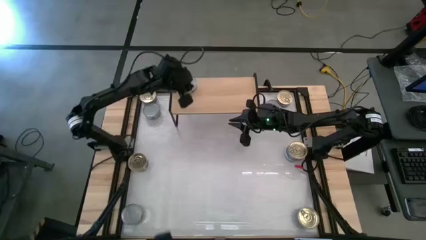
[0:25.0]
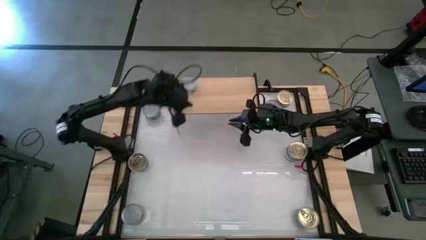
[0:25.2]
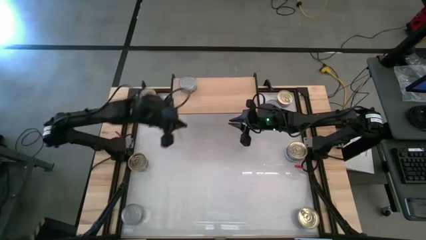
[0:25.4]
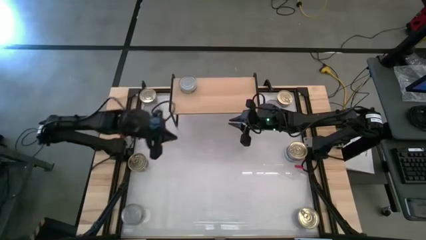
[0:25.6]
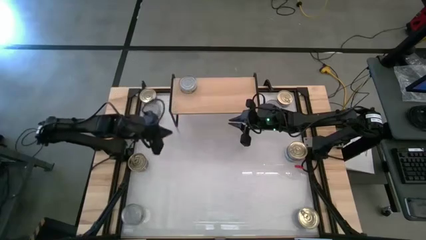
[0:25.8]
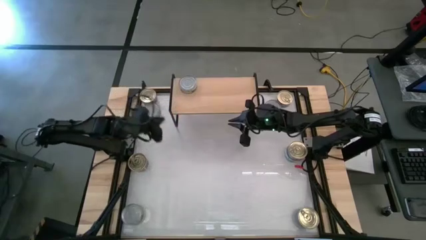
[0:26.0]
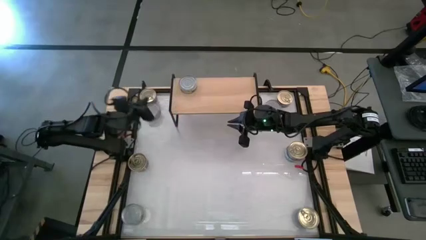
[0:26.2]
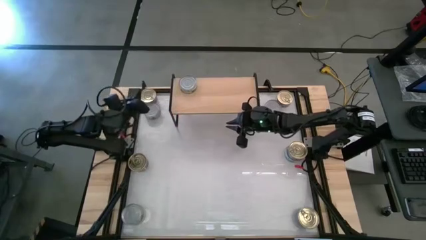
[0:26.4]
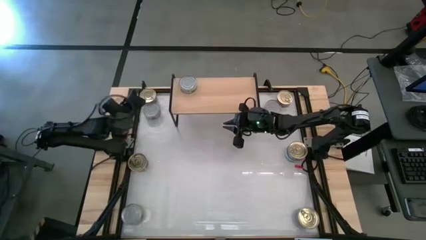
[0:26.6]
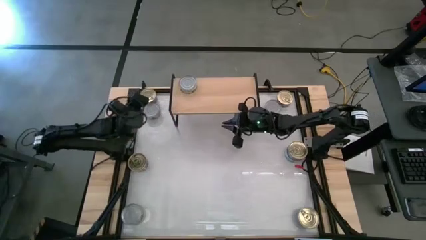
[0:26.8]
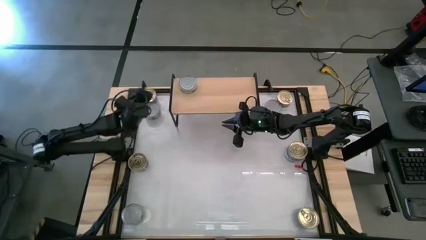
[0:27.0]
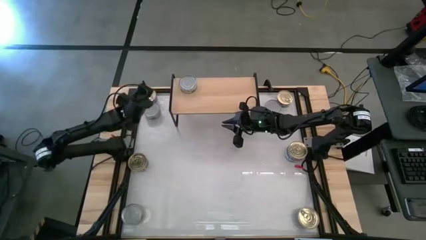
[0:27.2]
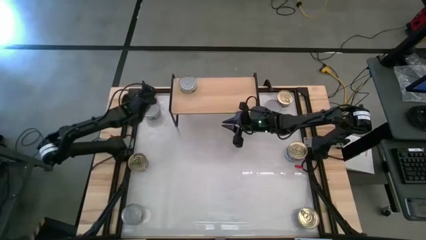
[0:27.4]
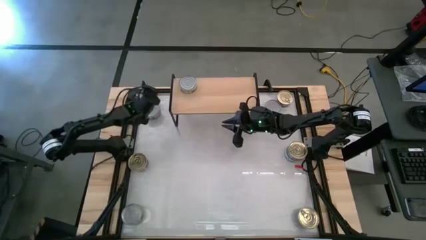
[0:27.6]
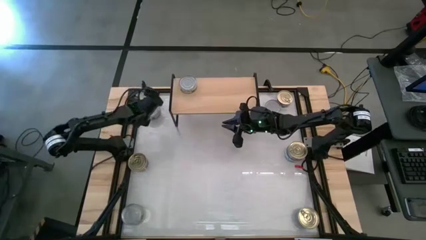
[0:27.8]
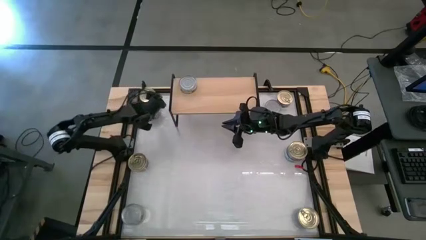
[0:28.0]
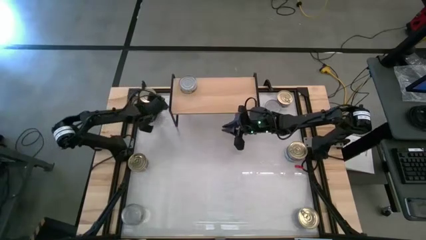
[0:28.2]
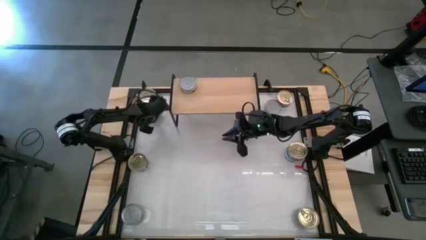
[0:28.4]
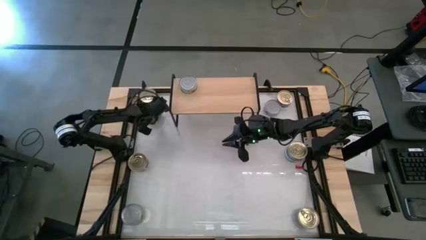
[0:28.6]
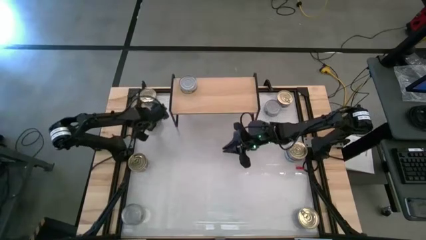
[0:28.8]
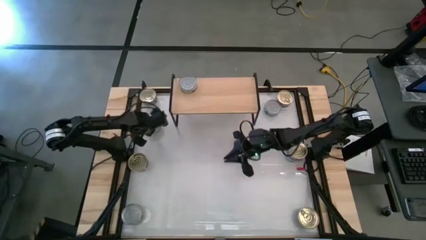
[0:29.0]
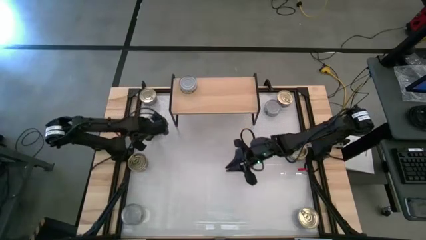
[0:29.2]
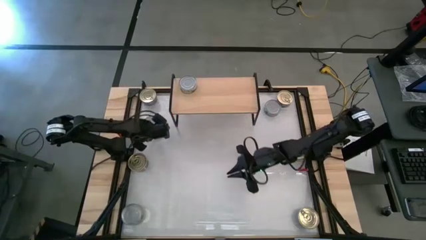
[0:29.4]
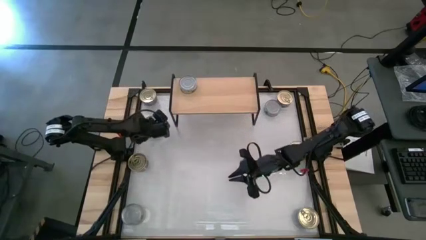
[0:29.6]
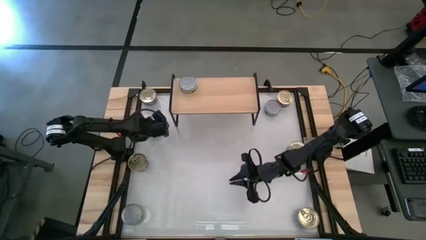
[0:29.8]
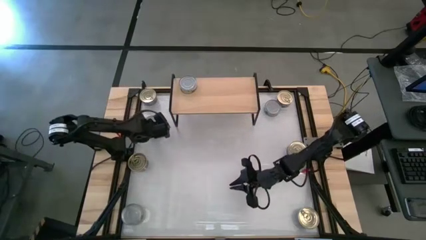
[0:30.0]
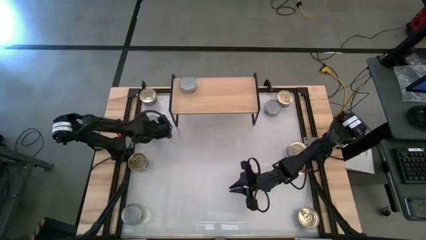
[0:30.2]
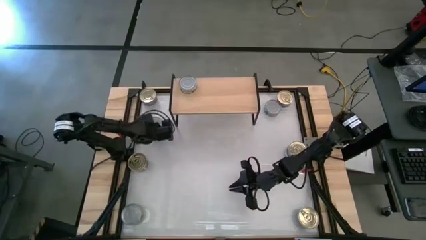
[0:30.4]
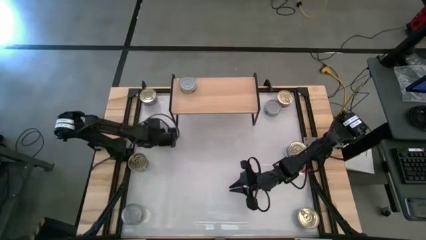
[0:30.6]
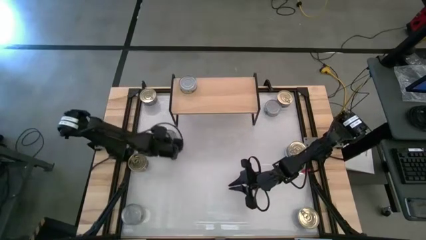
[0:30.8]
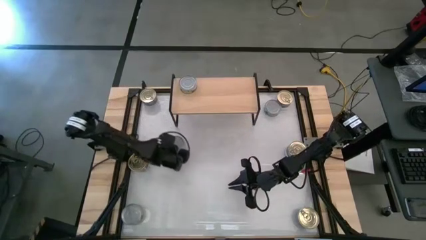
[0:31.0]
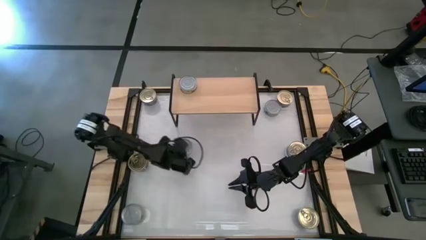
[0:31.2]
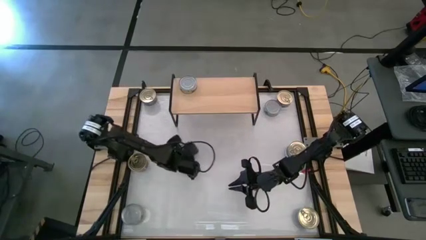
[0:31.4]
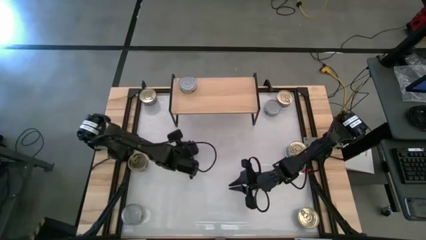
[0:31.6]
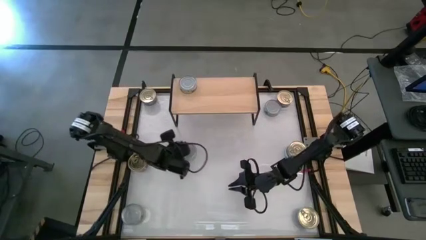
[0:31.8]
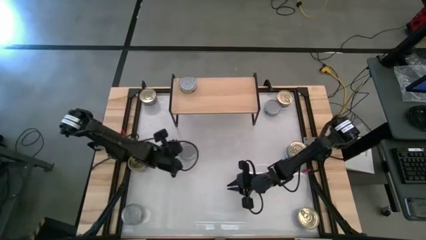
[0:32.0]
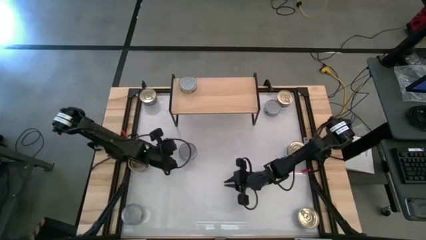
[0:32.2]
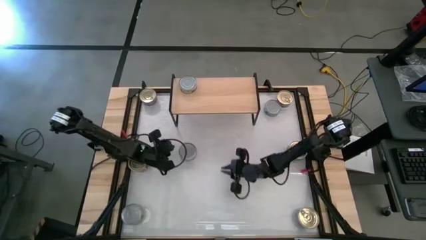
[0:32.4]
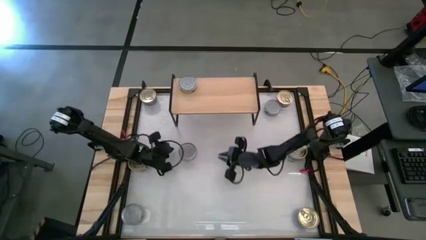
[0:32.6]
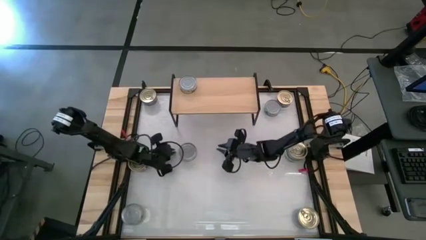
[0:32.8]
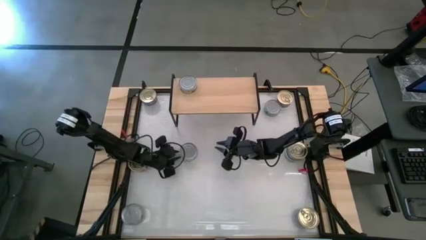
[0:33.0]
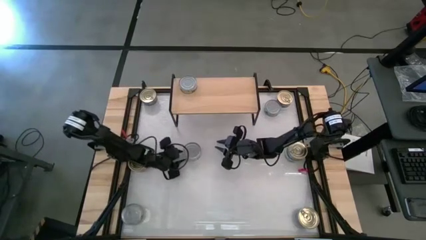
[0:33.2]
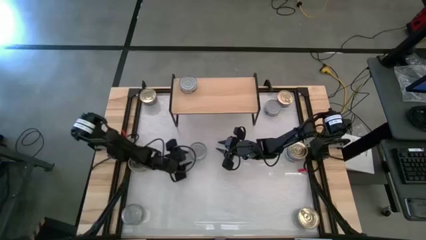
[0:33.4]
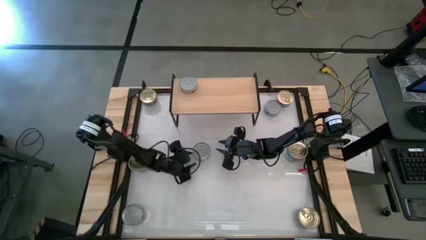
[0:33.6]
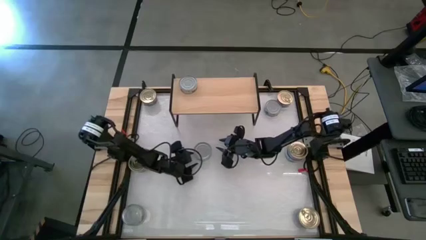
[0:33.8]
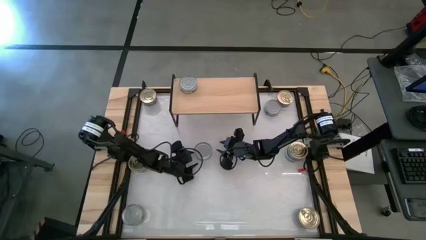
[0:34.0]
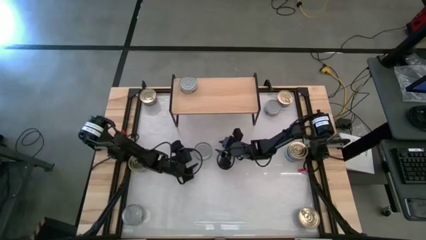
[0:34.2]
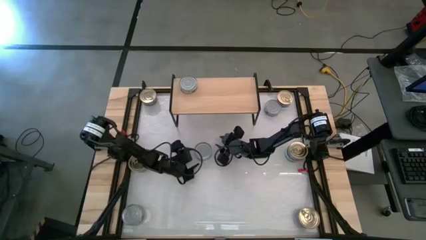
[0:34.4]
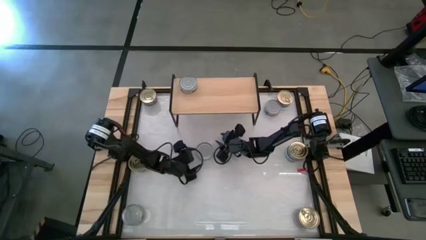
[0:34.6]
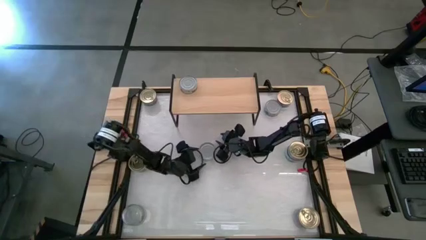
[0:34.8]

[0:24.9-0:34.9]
Task: Stack canned seafood by type on shelf
Put the green tuna can on the shelf
